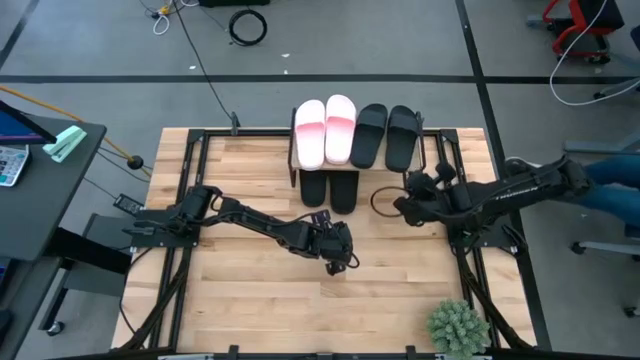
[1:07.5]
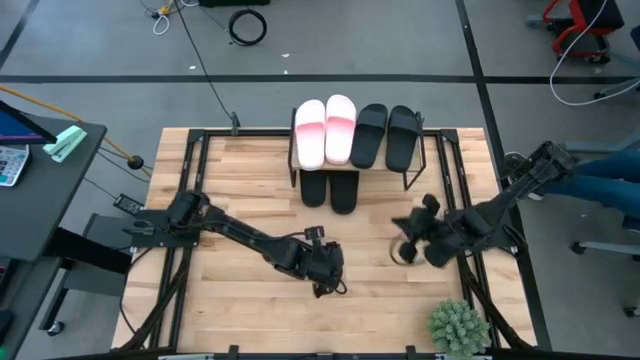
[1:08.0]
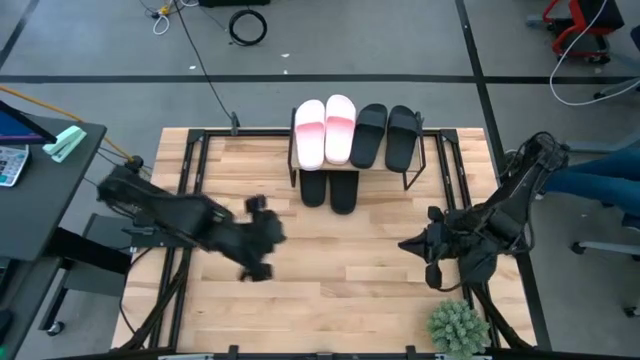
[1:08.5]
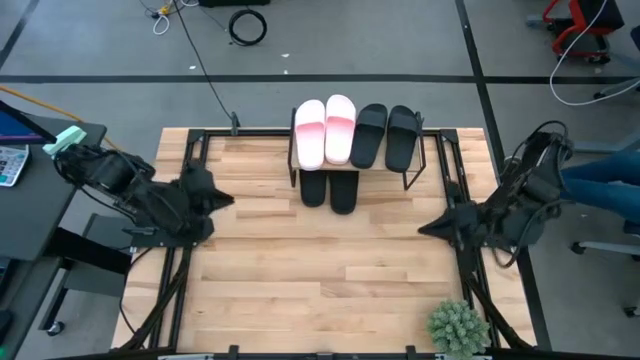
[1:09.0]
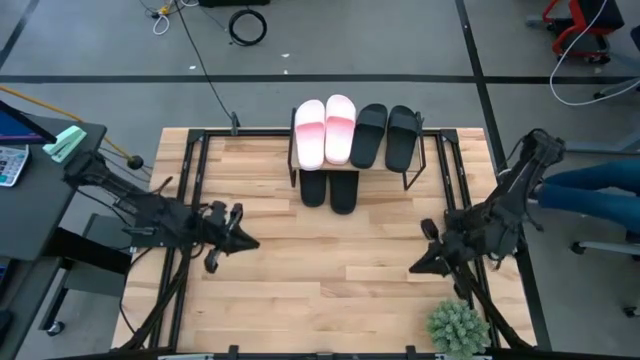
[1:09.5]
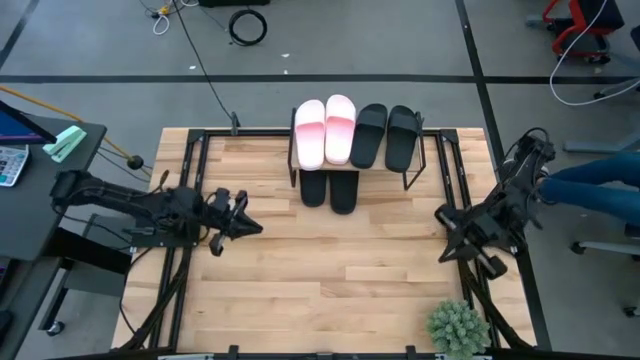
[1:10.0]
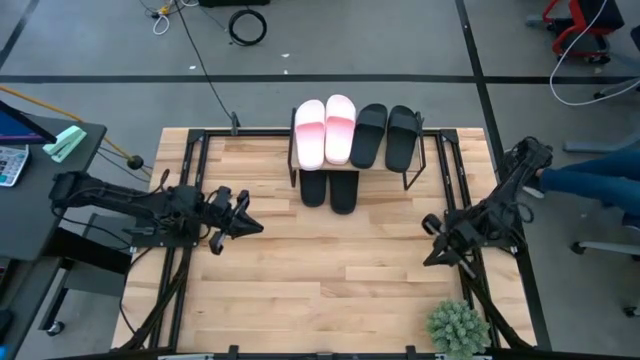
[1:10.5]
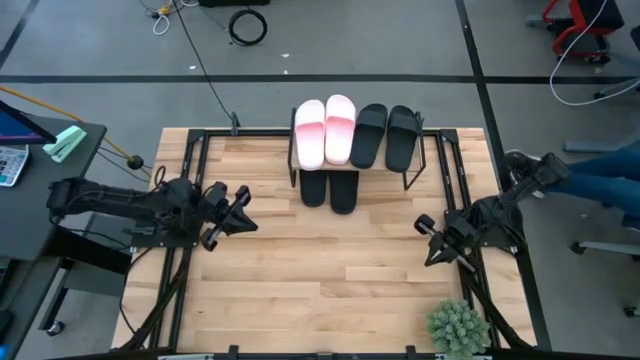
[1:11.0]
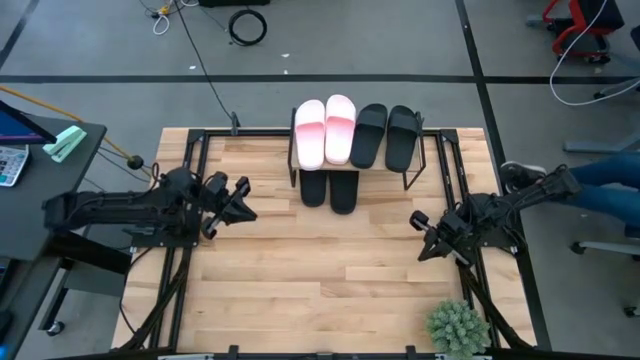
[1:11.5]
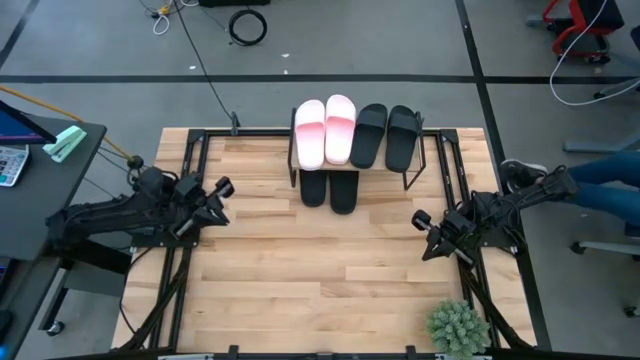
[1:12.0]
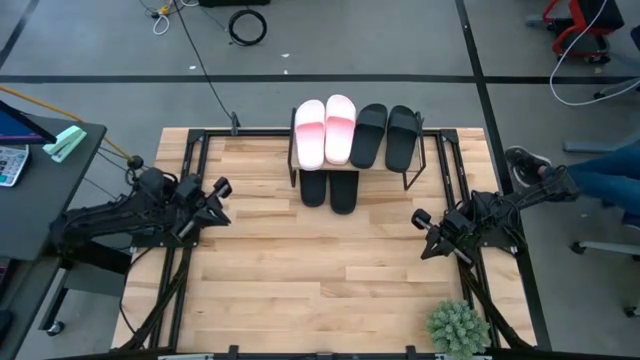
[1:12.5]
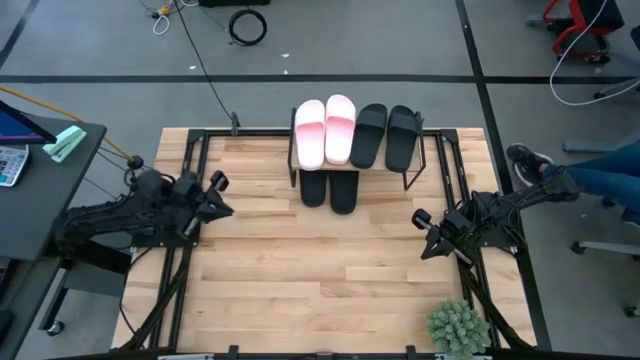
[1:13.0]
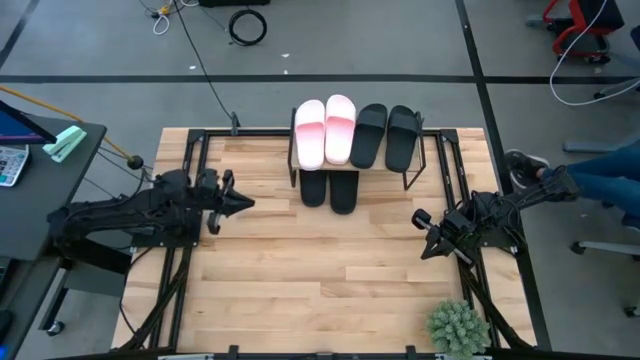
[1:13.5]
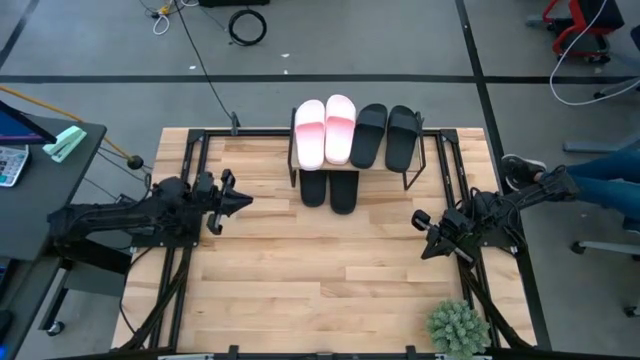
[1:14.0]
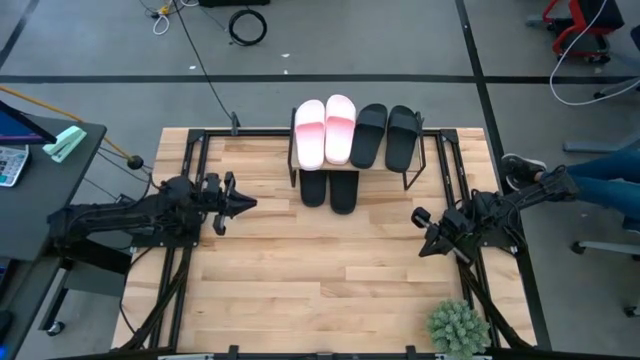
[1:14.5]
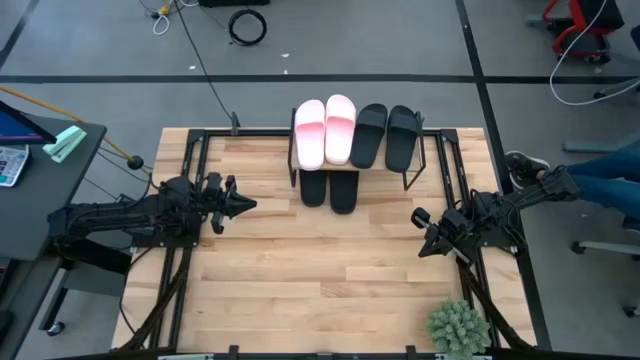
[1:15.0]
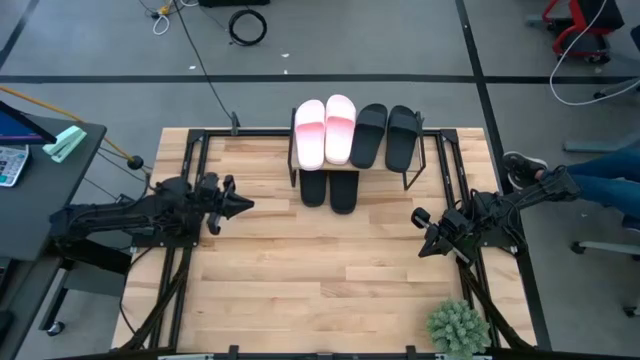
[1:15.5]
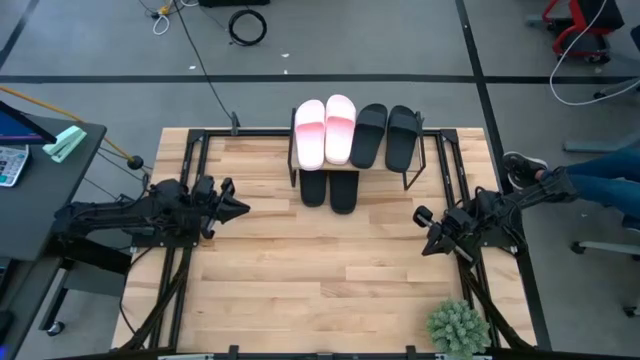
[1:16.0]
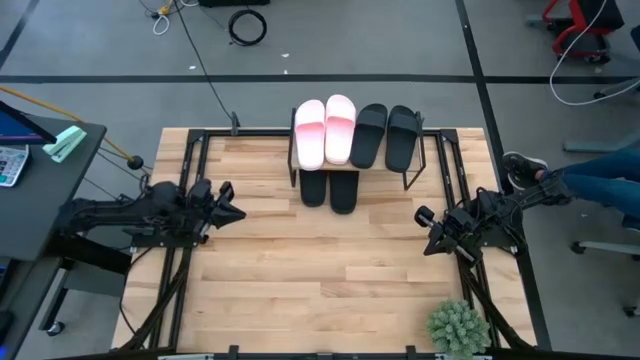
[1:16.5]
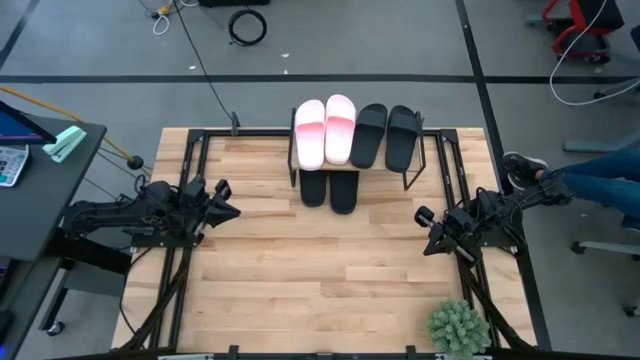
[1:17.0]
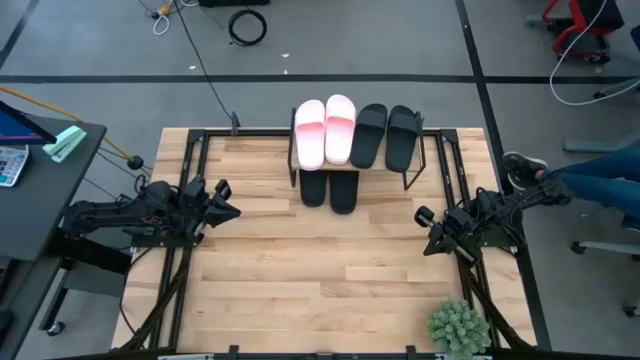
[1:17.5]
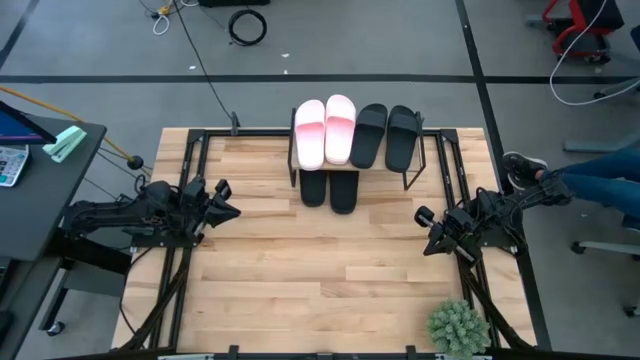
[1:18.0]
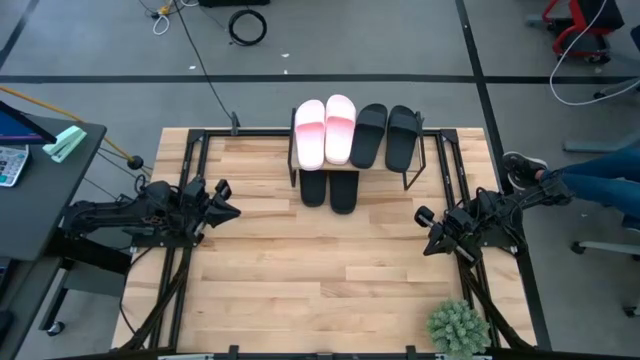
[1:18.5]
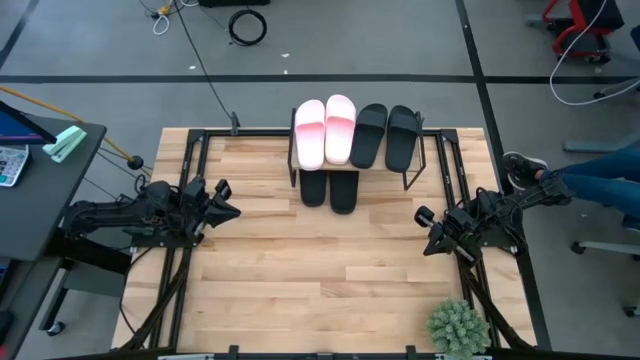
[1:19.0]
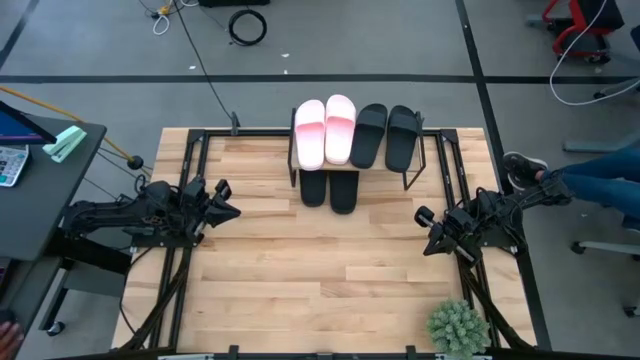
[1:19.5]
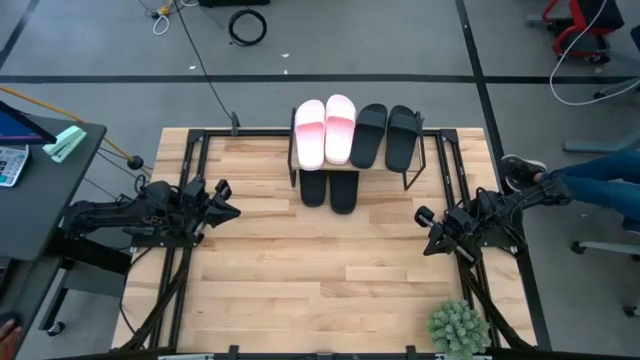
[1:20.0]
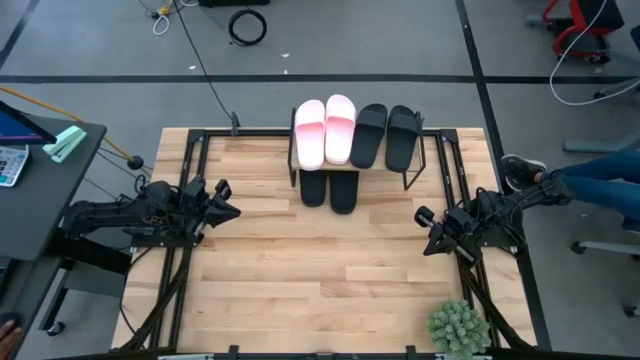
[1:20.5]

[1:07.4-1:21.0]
Task: Pick and place slides into the shelf
Return to Home Position

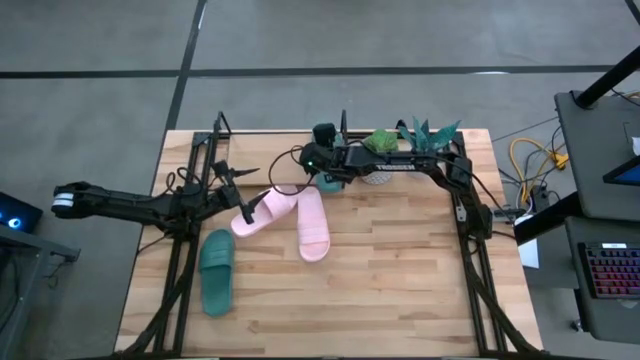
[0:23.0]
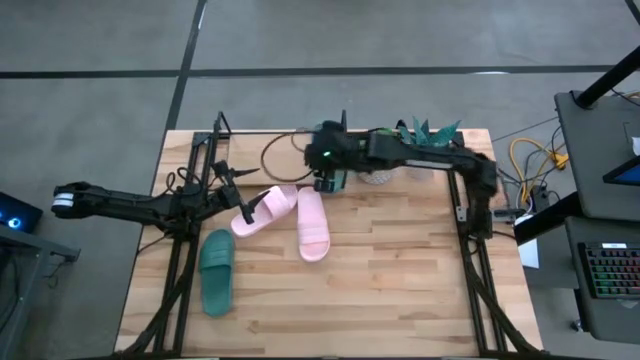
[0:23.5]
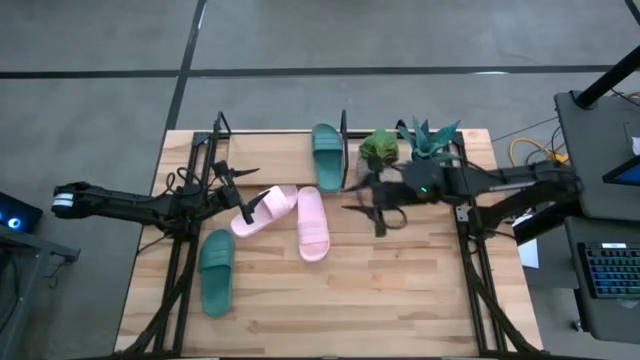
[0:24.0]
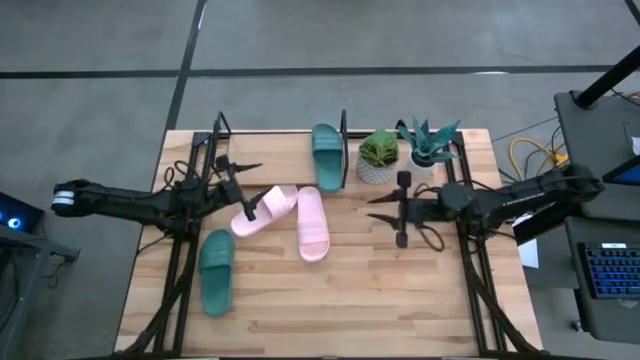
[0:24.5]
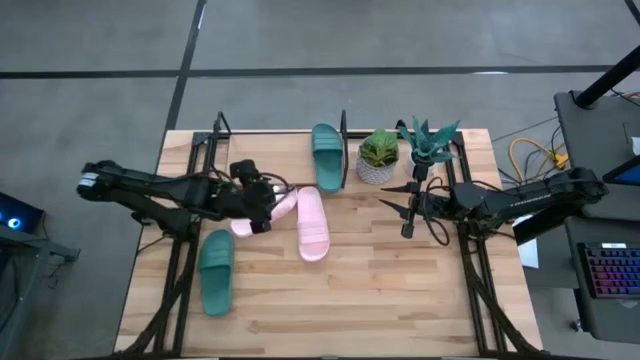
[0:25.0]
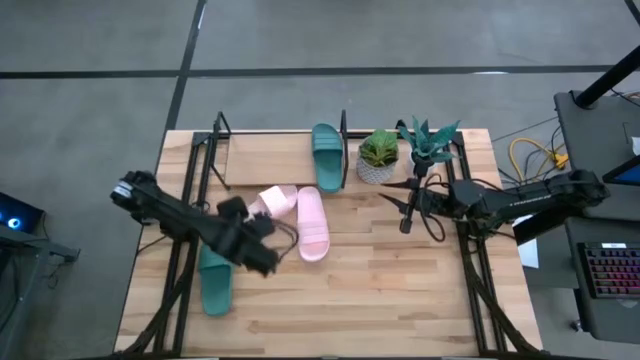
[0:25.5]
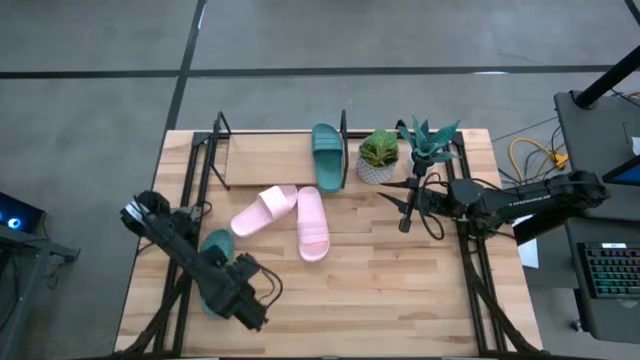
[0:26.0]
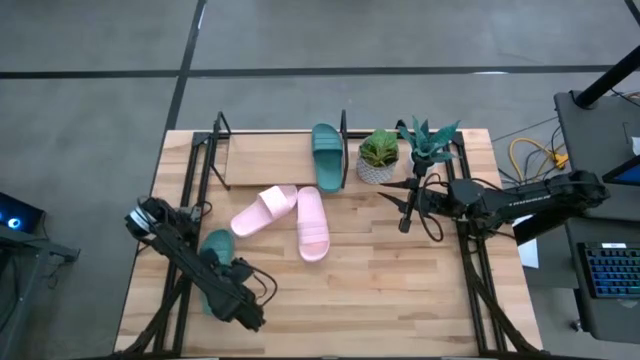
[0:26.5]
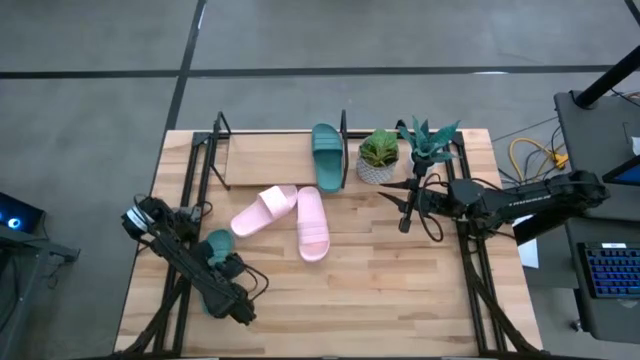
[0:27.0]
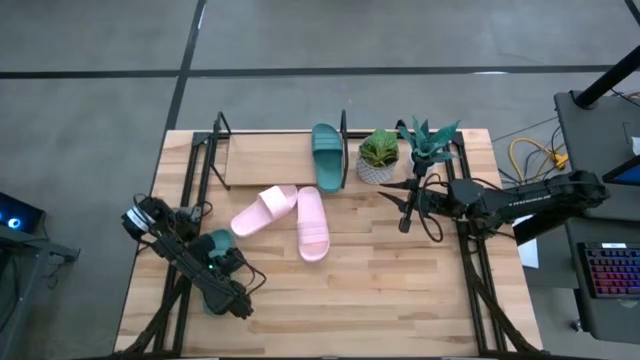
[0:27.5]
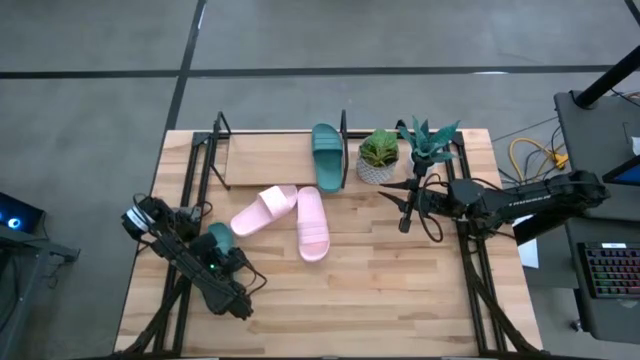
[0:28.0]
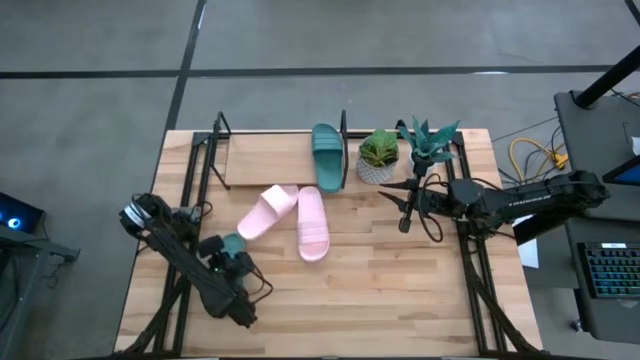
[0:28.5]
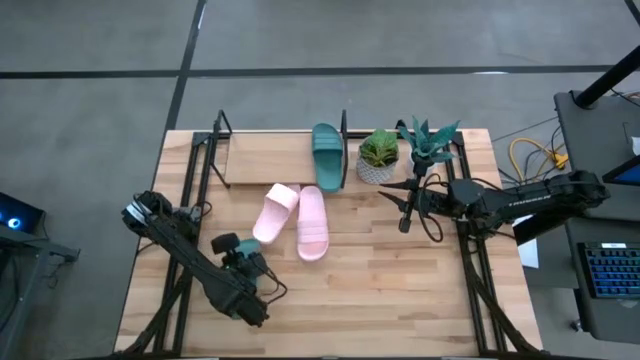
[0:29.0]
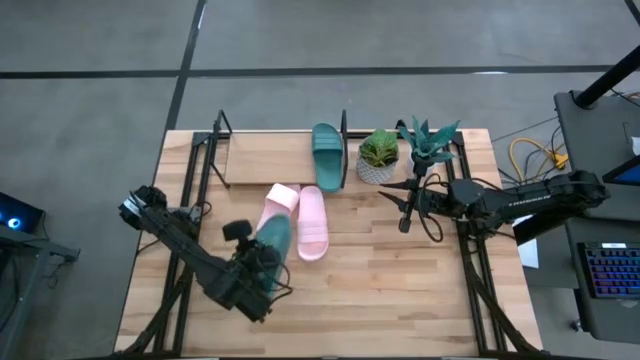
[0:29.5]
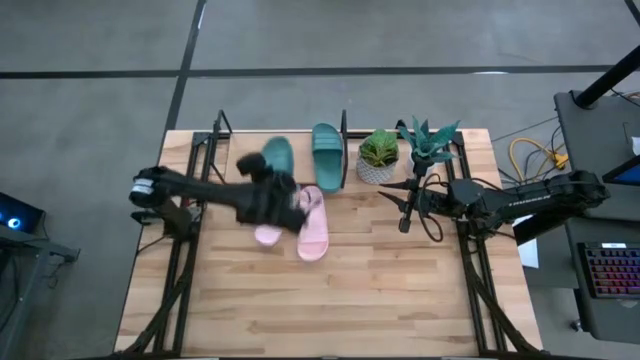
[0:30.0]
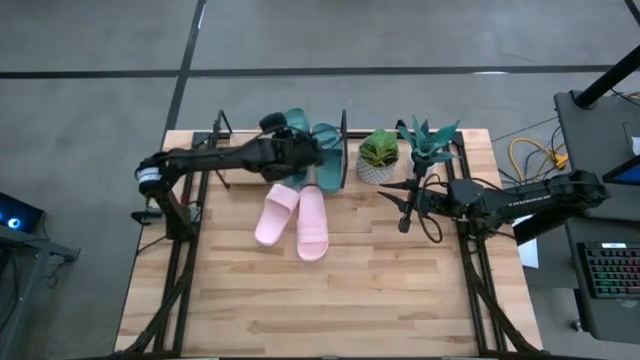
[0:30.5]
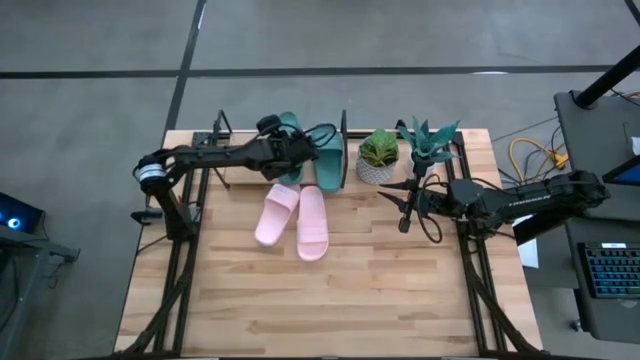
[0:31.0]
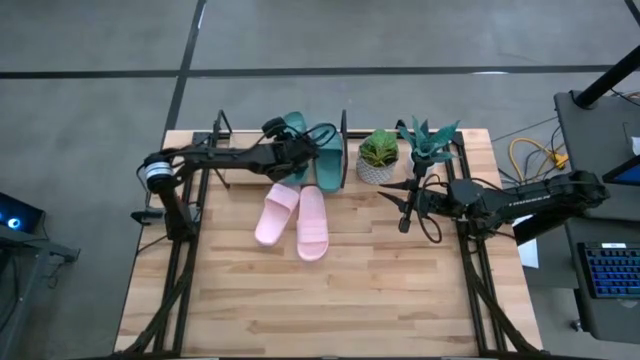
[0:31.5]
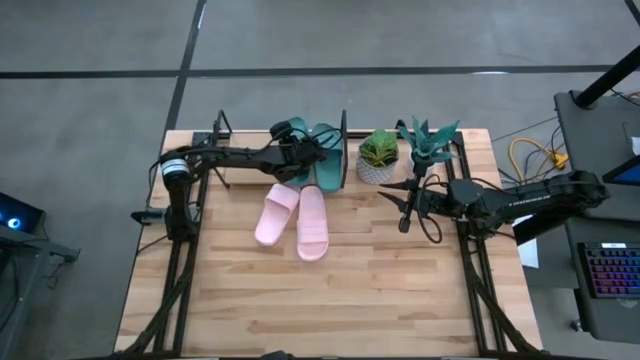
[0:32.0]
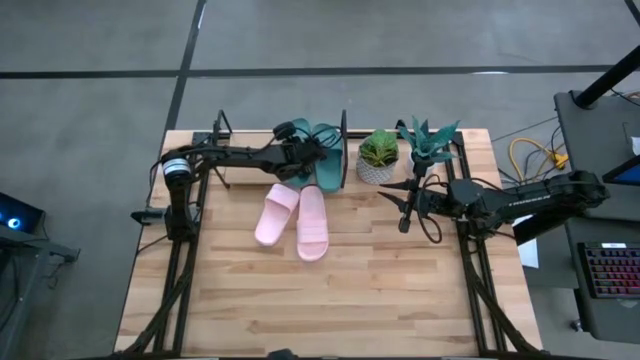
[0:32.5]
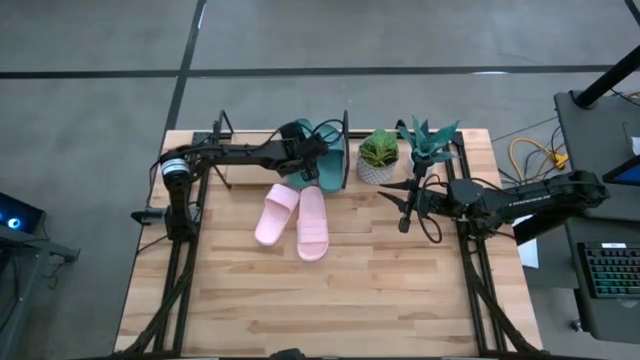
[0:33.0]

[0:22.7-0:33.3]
Task: Pick and place slides into the shelf
Put the green slide into the shelf
